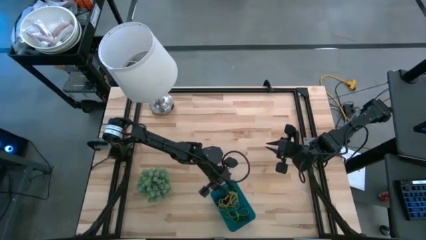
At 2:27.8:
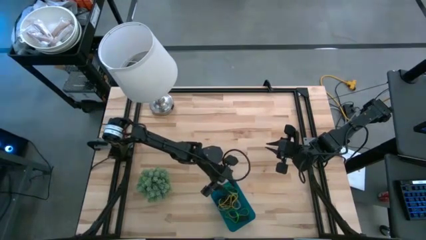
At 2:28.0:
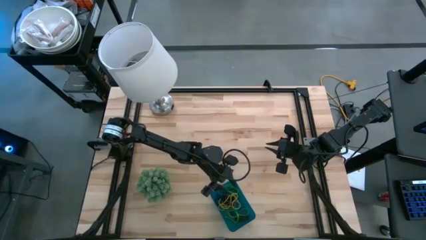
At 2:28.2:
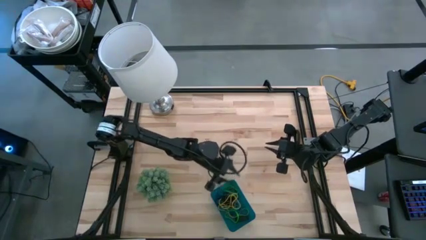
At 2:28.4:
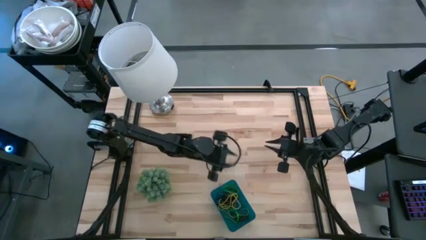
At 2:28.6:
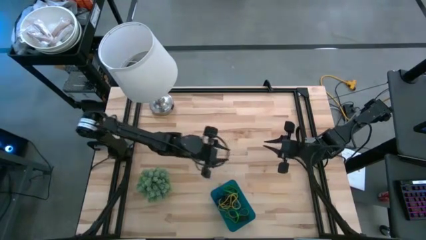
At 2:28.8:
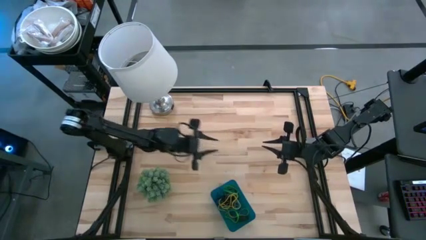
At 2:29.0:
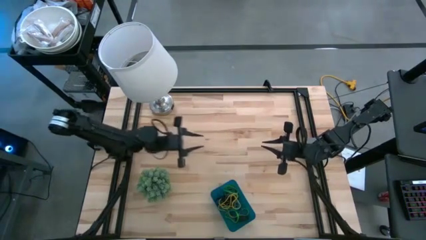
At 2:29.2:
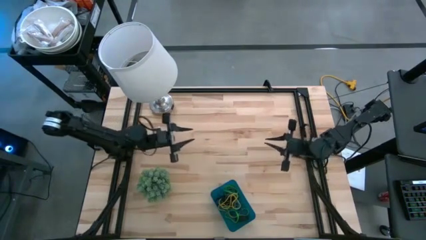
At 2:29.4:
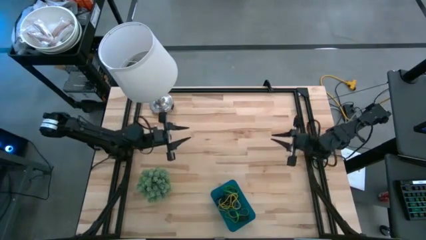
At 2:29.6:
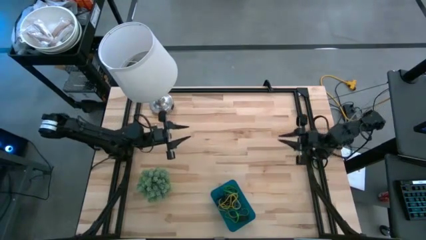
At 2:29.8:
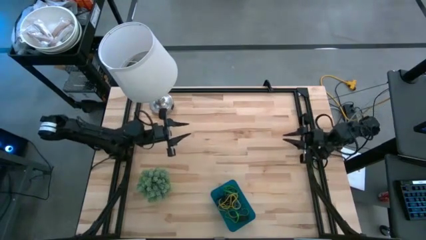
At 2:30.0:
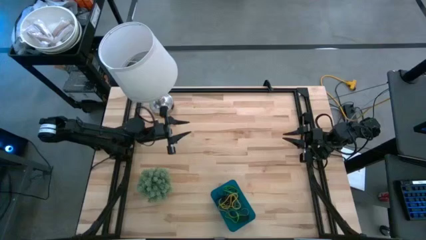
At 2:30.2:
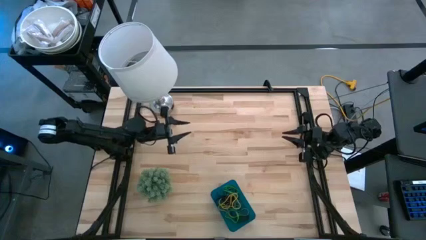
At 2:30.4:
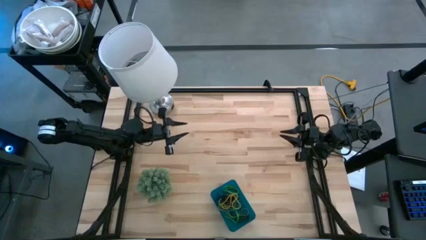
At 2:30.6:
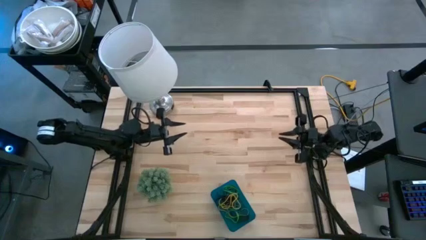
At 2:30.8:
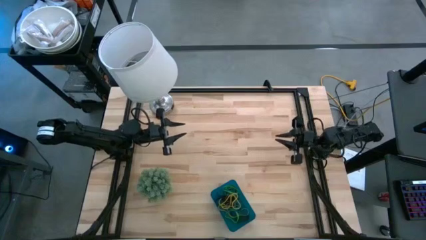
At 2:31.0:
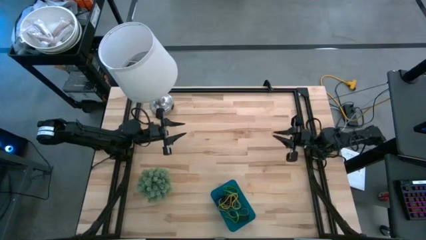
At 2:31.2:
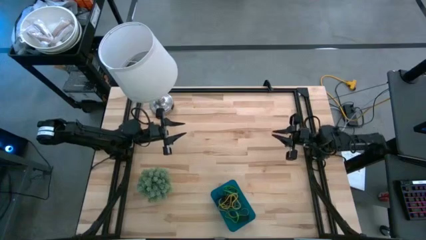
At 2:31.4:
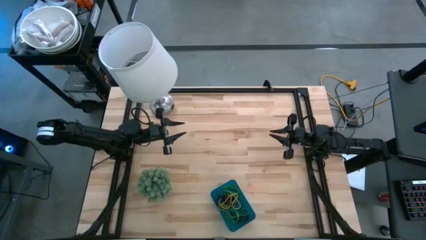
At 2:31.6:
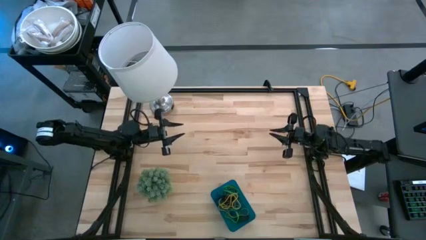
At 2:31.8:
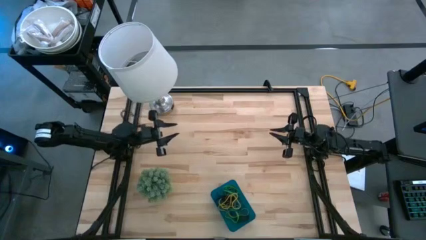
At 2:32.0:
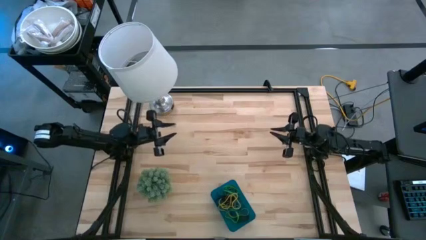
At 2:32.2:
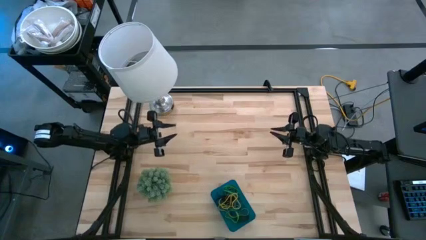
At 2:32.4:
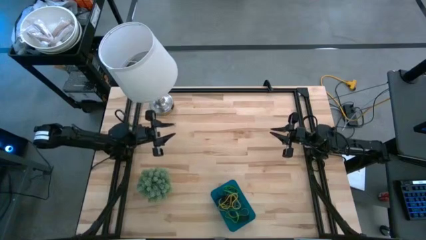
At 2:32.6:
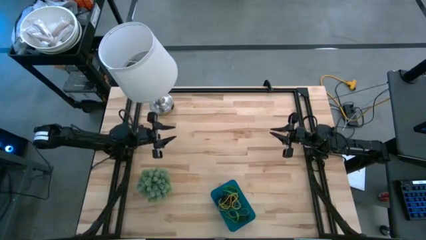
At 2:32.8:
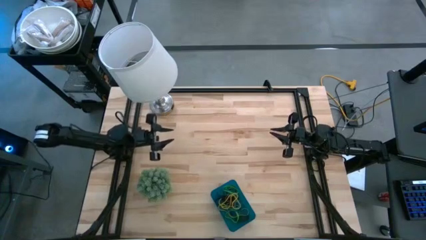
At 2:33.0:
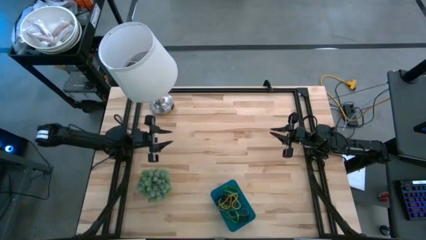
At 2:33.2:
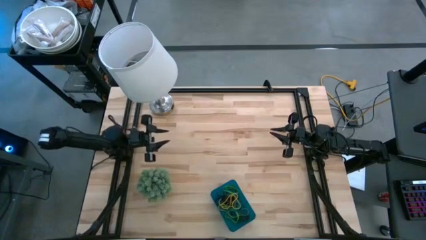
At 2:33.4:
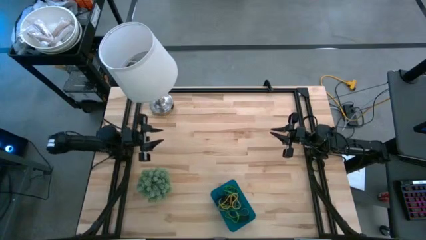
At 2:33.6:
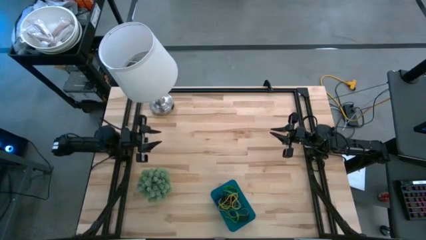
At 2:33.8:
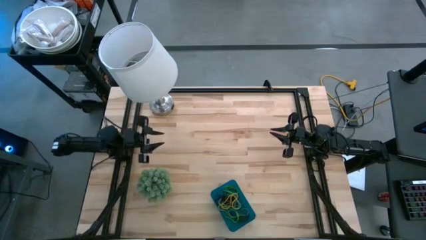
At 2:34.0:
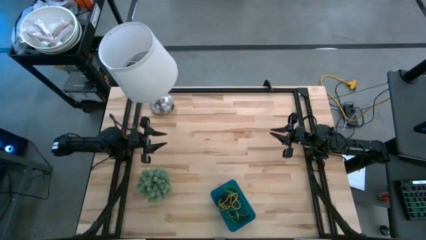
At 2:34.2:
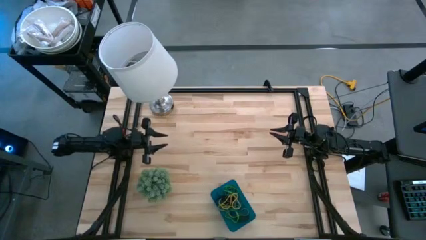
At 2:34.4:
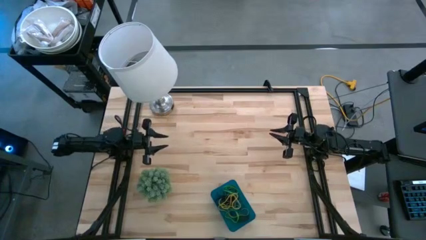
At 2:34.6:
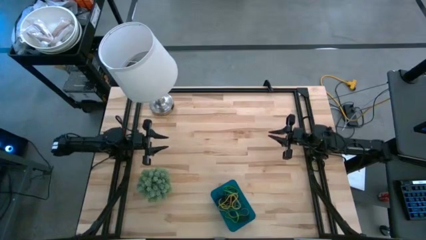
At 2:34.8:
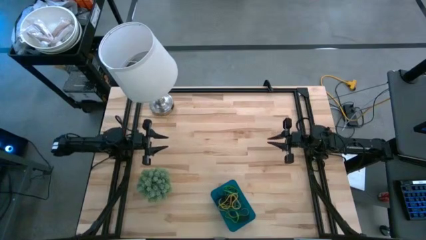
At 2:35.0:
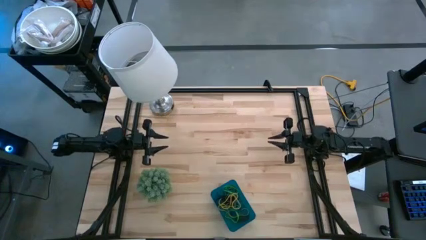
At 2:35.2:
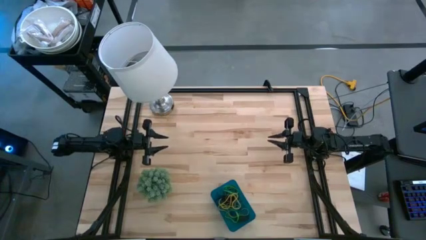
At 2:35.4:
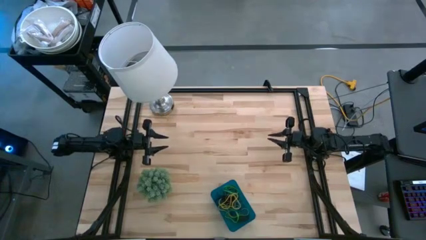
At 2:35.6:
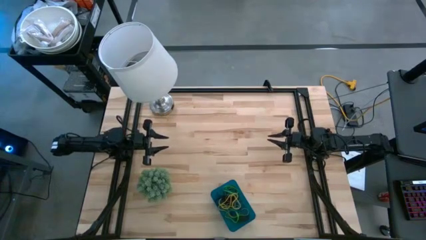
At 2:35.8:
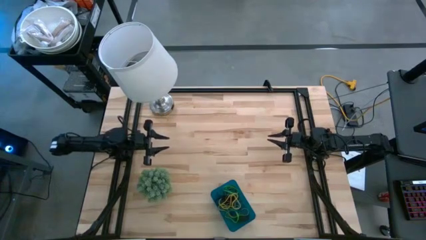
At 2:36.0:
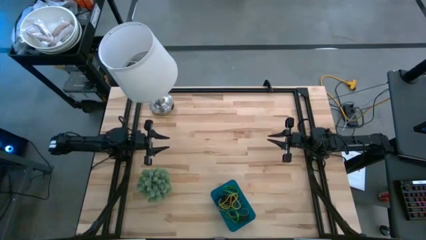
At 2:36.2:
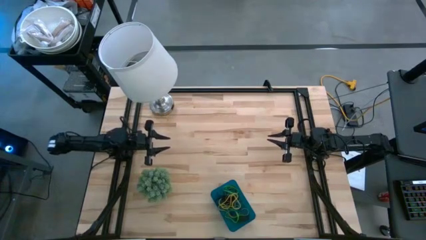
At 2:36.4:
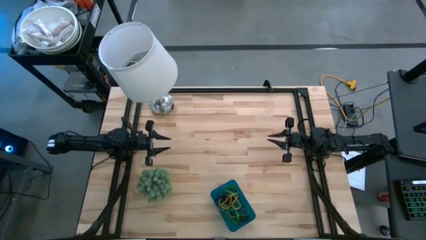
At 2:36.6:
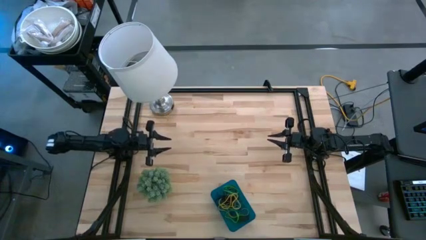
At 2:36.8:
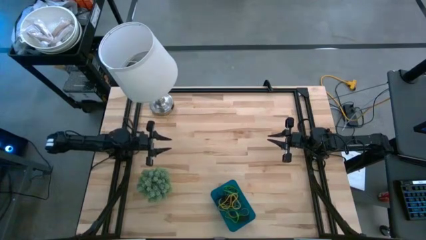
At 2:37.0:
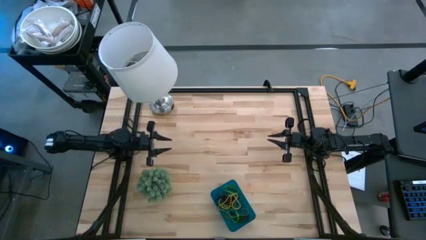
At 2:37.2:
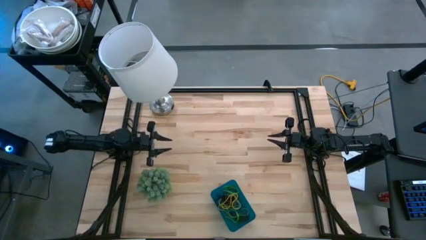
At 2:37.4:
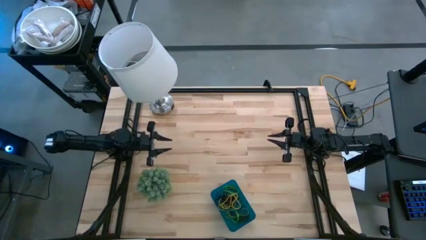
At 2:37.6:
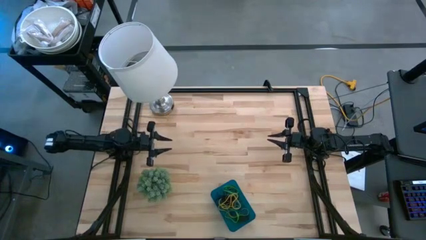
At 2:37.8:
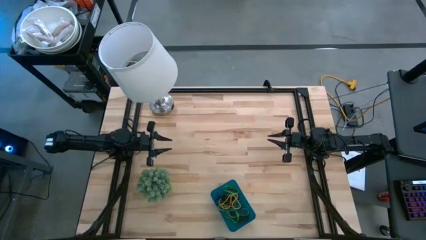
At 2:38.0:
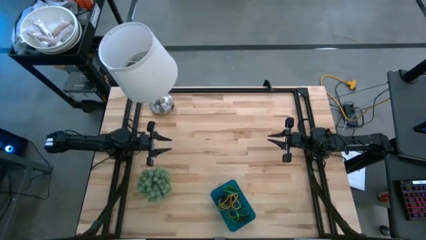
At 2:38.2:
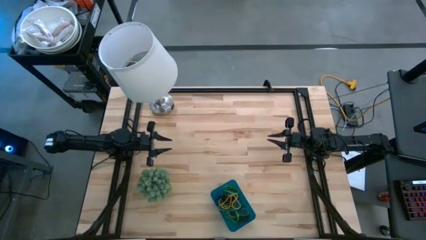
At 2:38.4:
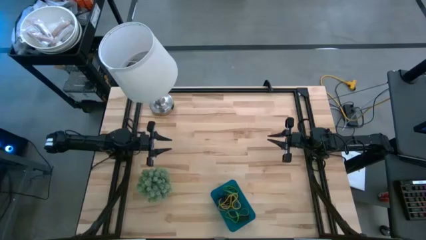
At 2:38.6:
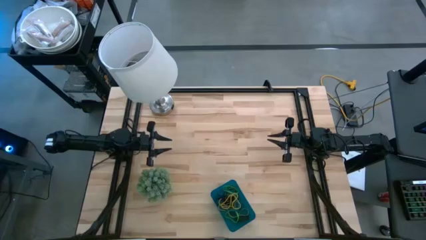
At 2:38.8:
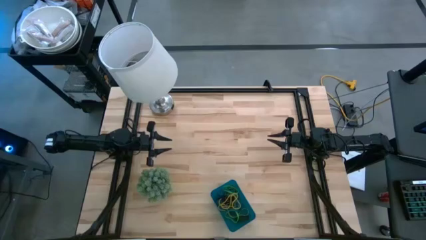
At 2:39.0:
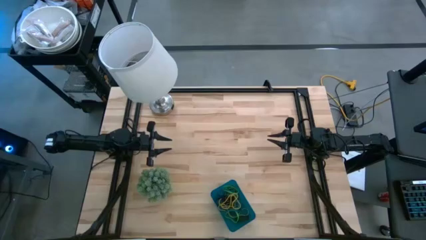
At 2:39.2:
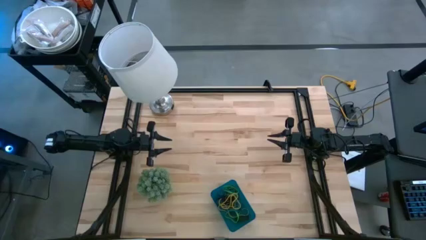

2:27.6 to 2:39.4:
Task: Pick and place rubber bands into bin
Return to Home Position

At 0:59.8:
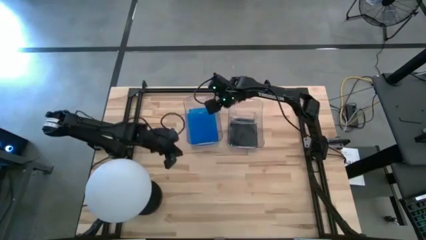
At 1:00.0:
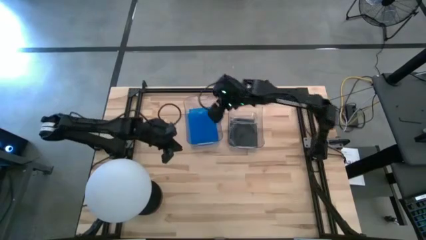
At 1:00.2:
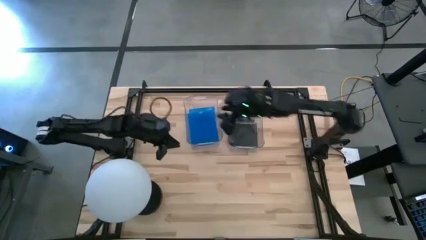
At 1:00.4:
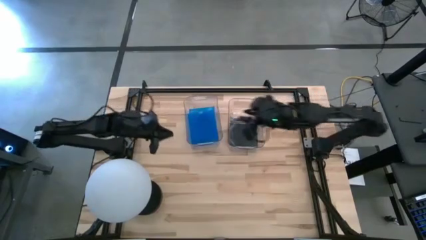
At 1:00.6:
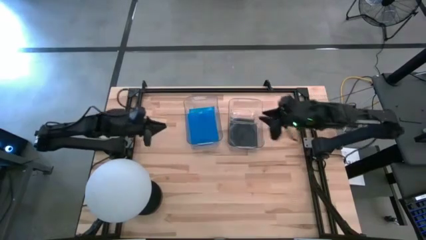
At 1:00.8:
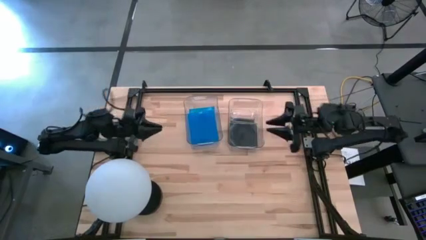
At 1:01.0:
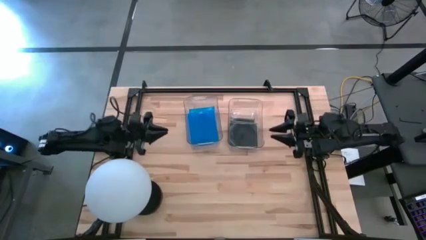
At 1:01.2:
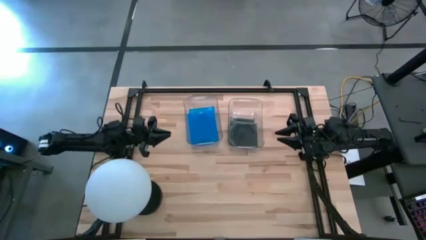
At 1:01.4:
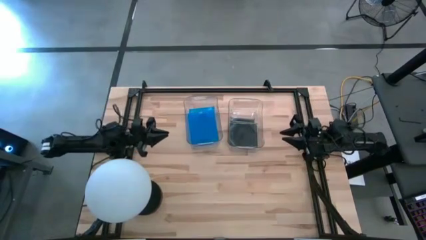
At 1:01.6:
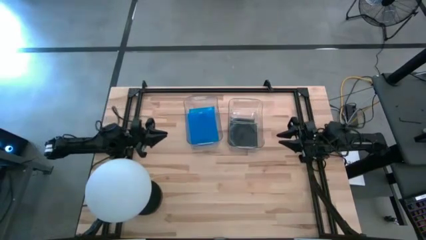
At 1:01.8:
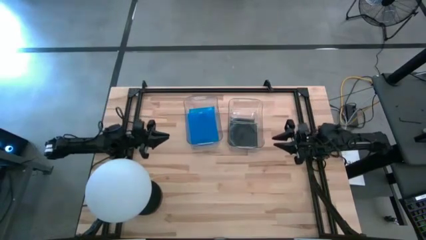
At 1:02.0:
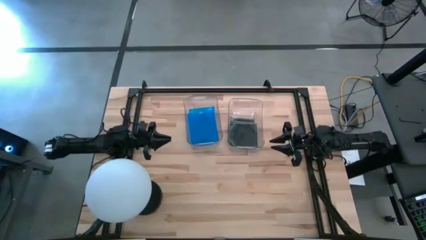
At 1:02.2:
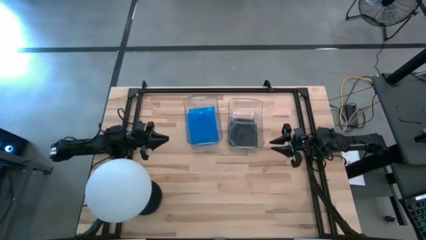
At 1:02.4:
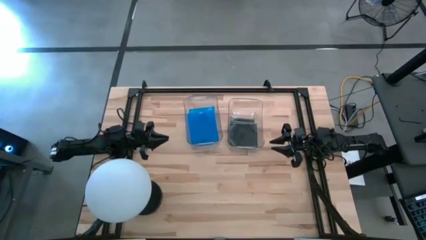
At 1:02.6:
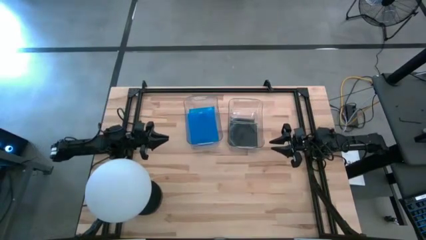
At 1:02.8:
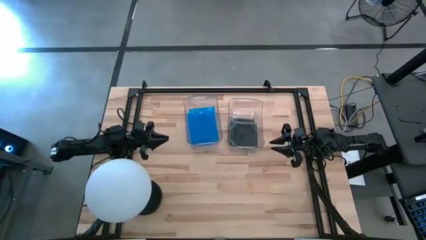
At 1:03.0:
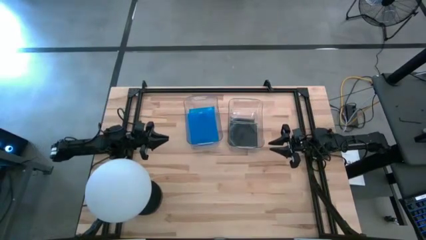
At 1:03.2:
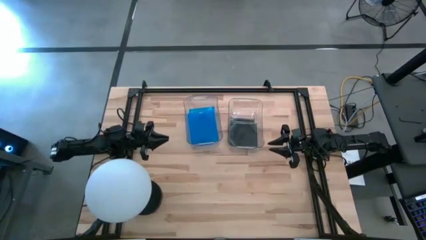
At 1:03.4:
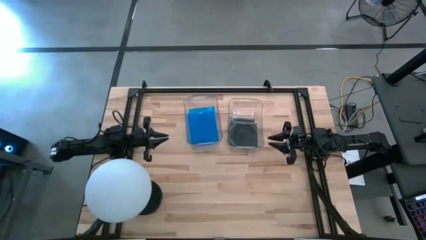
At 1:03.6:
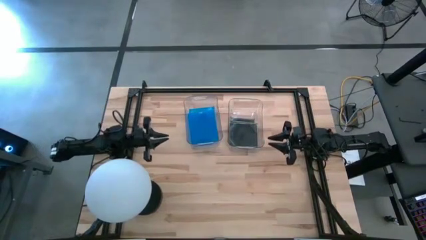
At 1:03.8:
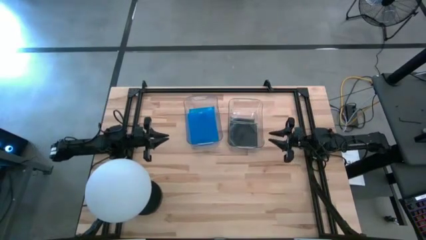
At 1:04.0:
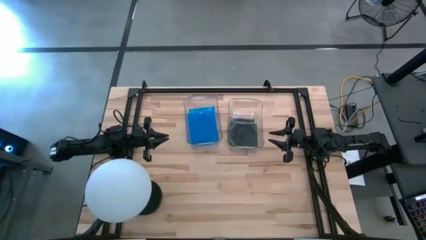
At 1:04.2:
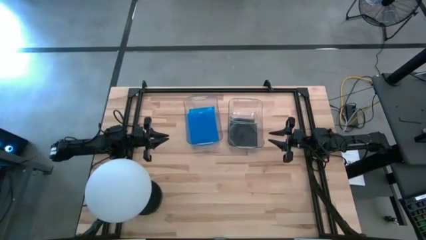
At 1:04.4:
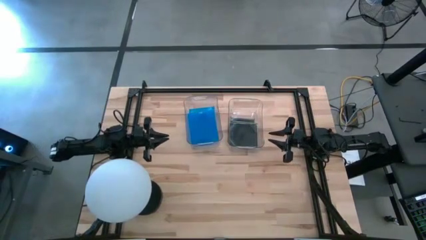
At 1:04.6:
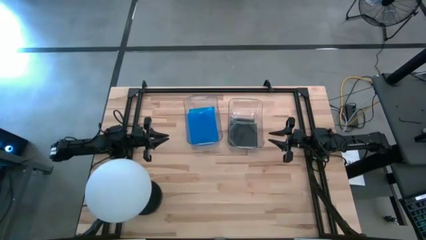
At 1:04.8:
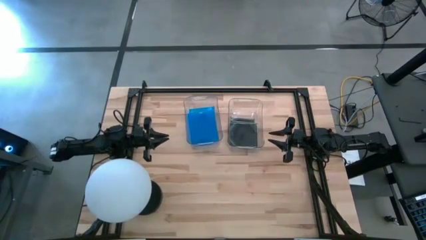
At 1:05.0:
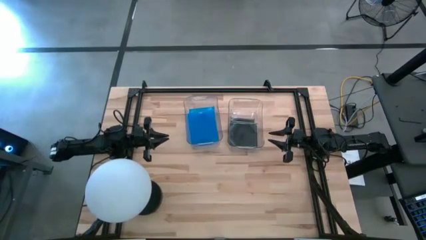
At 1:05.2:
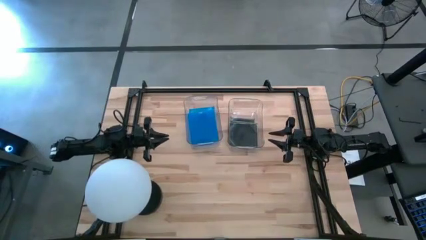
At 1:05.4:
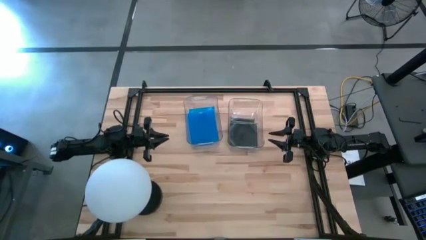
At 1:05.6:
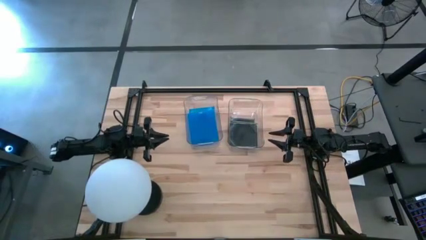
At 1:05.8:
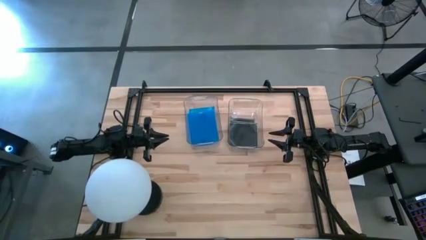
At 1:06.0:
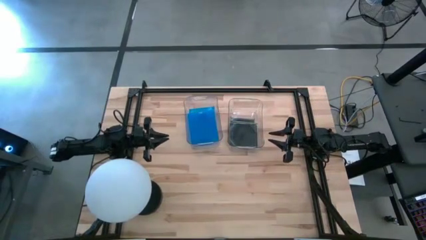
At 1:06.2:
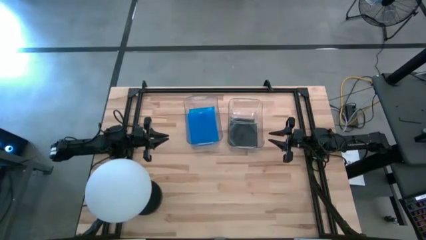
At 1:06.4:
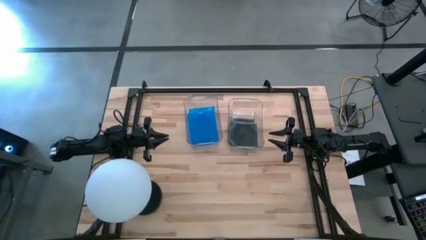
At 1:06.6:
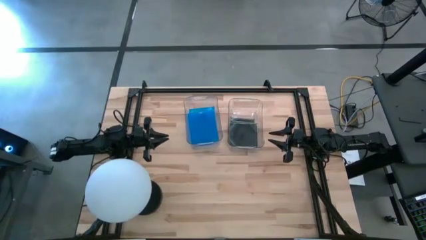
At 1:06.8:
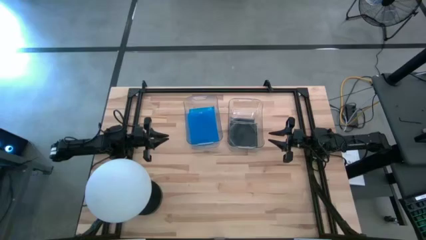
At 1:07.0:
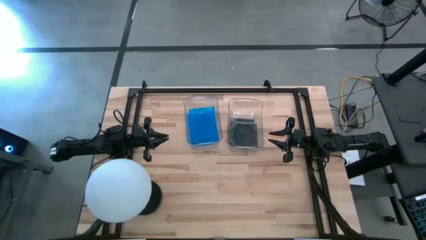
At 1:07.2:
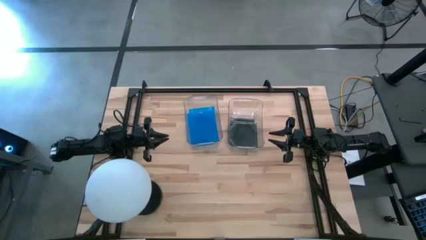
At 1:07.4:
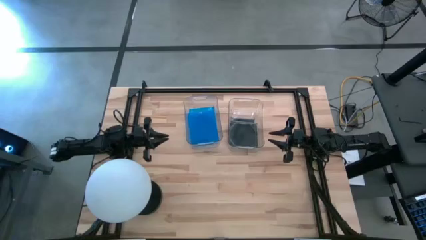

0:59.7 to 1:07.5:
Task: Pick & place jewel cases by type
Return to Home Position
